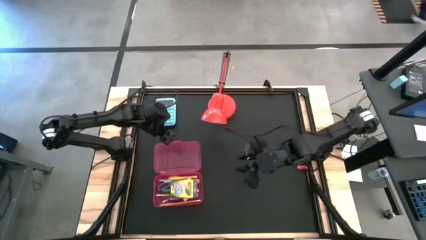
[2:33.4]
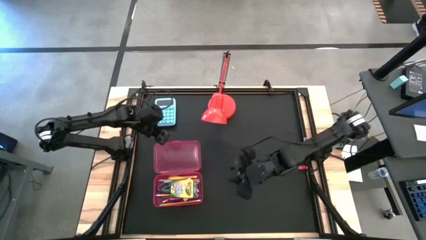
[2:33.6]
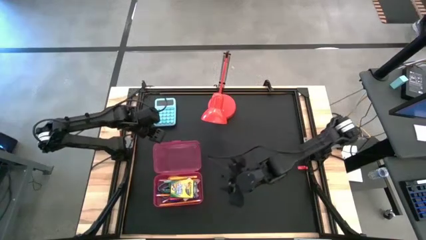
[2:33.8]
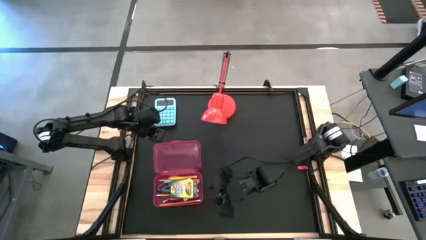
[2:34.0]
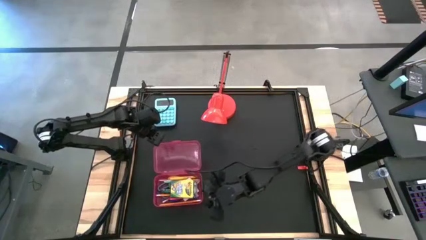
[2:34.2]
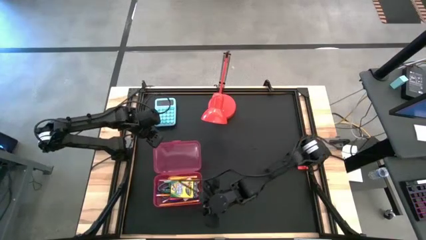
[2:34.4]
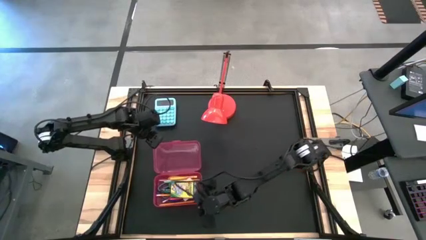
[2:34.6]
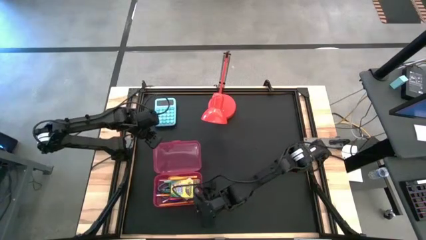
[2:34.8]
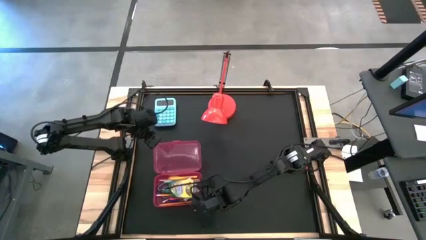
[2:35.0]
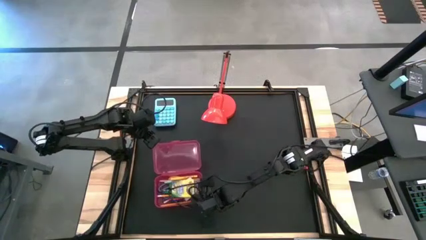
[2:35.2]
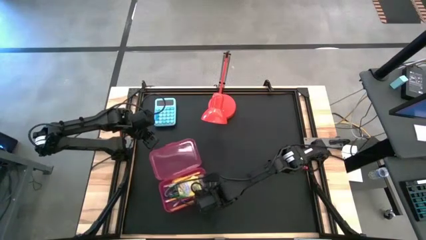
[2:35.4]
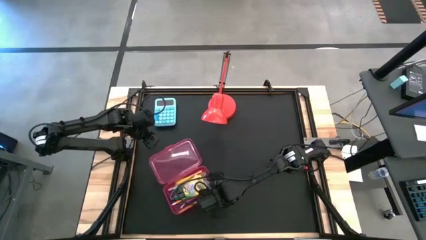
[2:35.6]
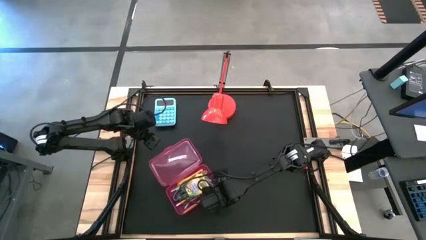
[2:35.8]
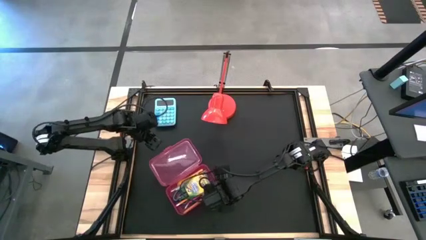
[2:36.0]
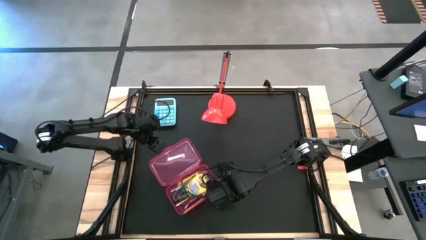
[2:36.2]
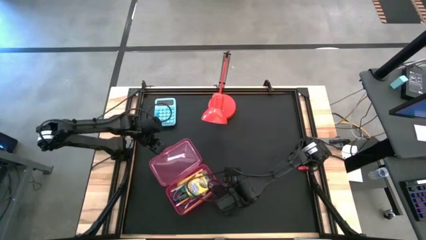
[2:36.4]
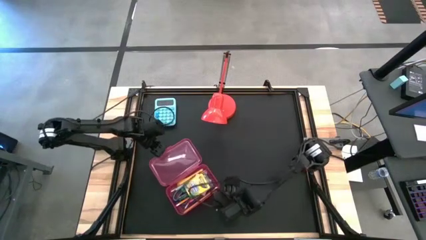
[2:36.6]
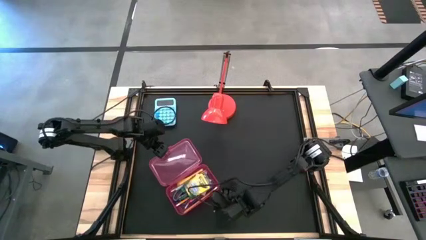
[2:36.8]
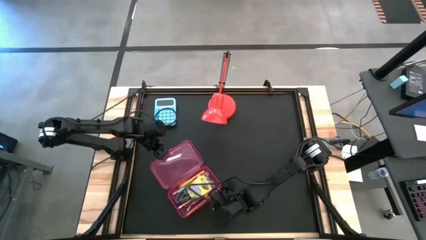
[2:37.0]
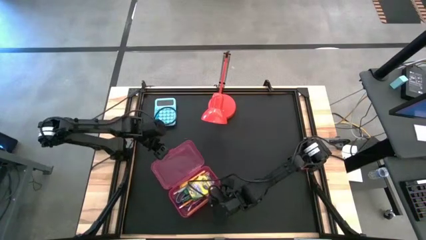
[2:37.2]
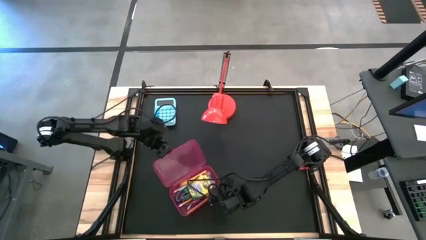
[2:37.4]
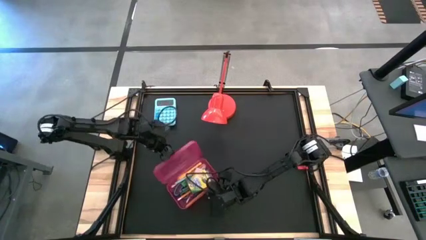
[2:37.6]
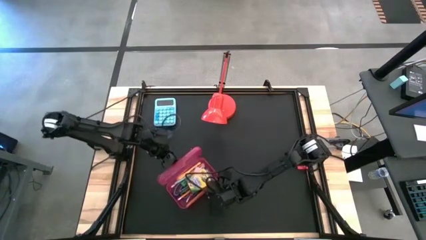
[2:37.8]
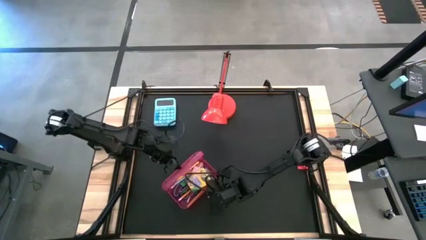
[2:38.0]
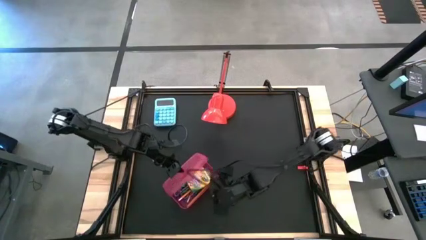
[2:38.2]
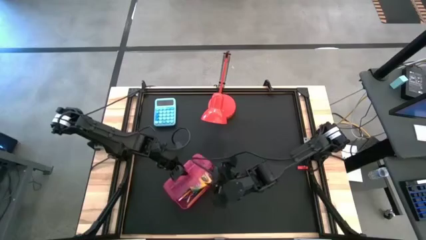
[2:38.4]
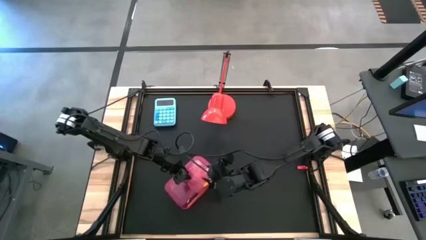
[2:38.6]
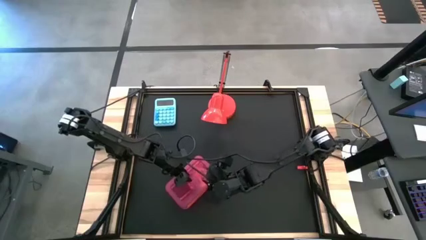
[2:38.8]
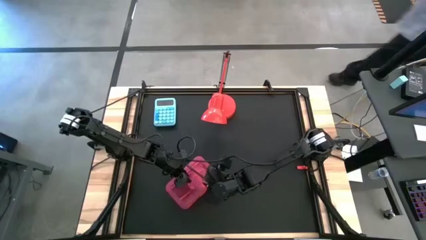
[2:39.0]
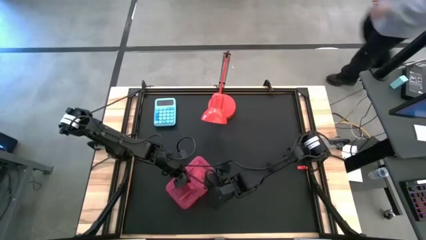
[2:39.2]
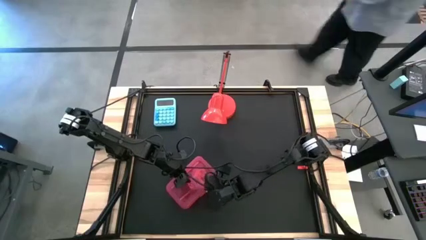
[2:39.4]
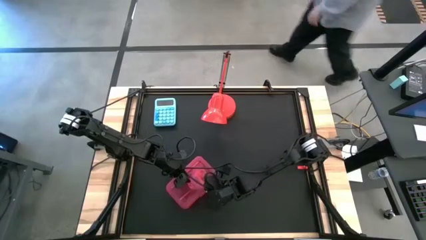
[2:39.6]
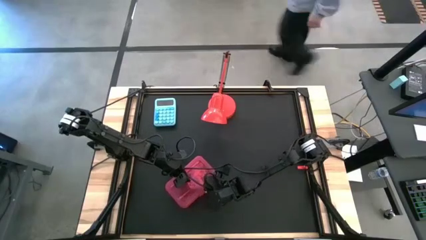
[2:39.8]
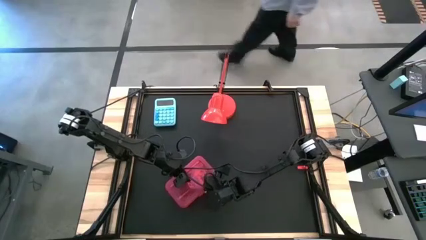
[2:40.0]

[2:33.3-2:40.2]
Task: Pack school essentials
Close the red supply box

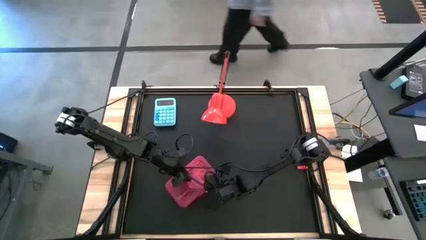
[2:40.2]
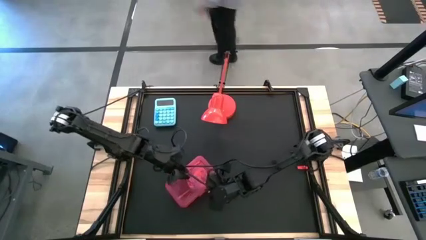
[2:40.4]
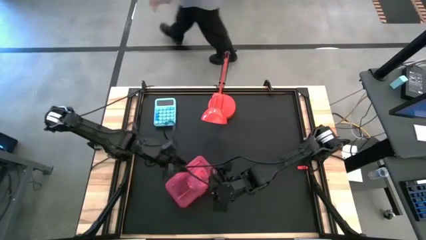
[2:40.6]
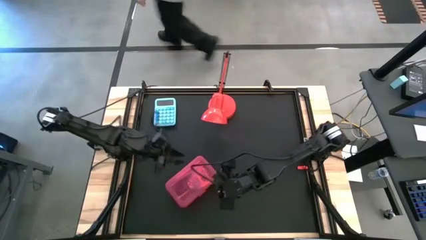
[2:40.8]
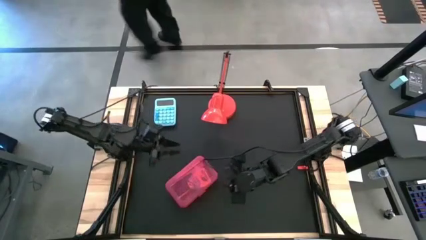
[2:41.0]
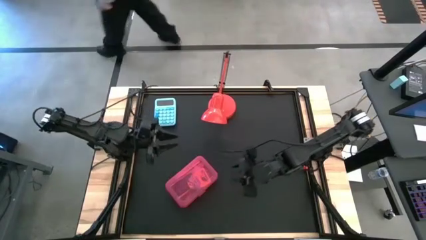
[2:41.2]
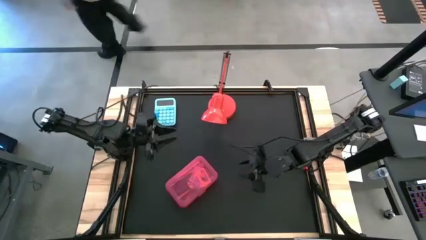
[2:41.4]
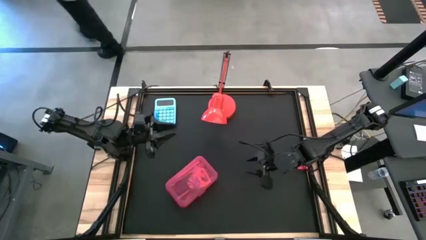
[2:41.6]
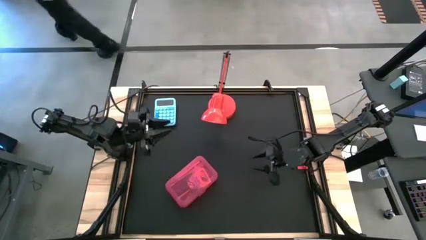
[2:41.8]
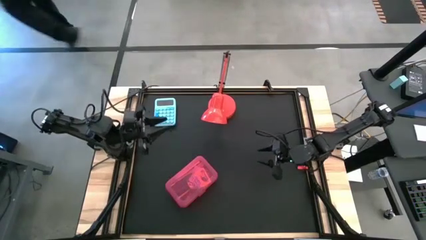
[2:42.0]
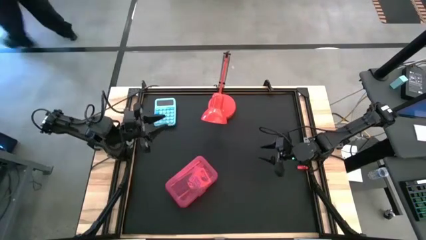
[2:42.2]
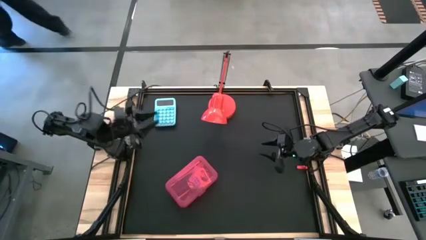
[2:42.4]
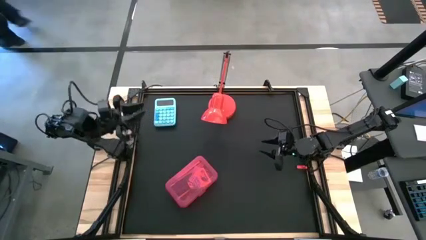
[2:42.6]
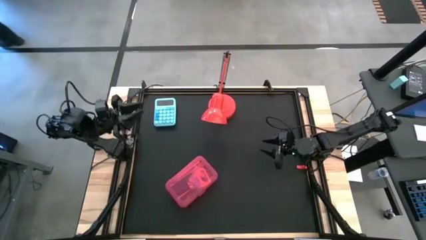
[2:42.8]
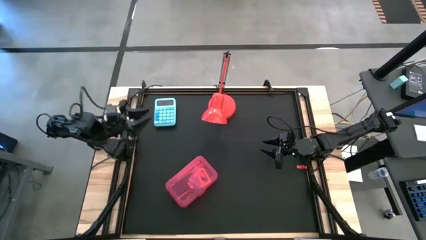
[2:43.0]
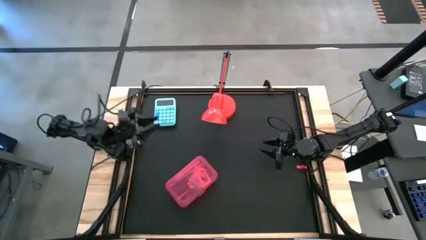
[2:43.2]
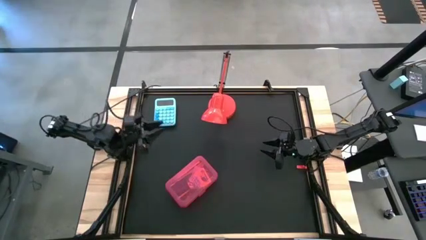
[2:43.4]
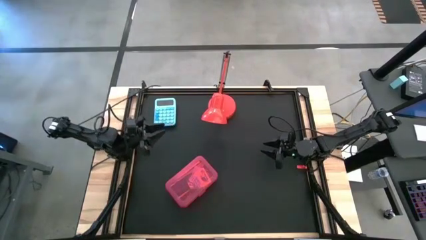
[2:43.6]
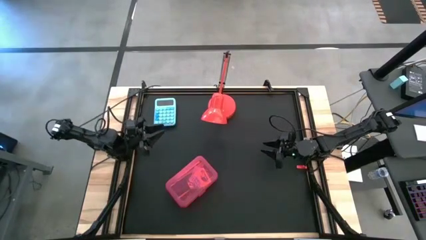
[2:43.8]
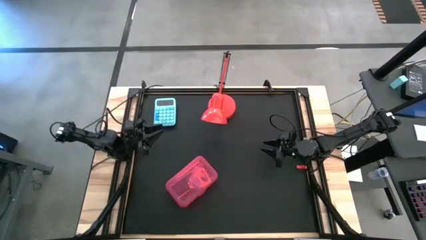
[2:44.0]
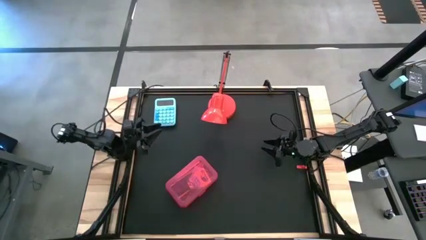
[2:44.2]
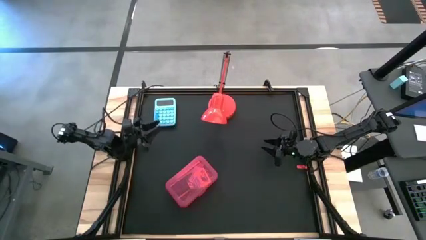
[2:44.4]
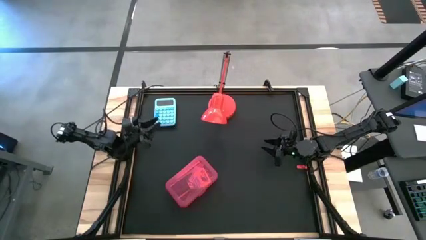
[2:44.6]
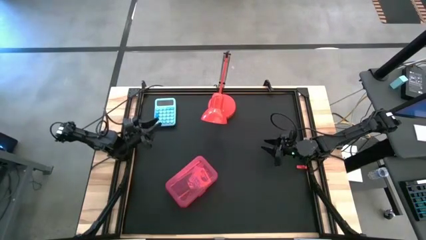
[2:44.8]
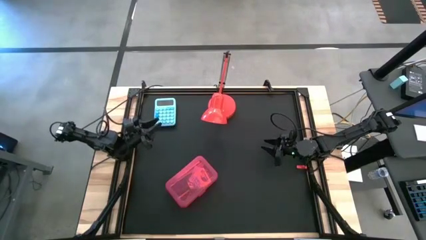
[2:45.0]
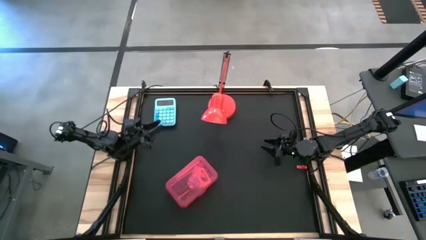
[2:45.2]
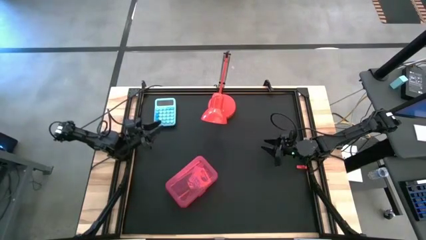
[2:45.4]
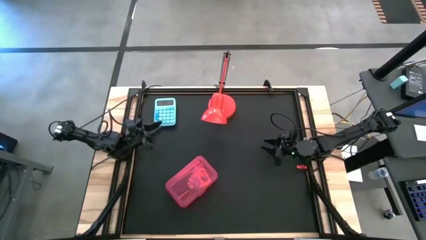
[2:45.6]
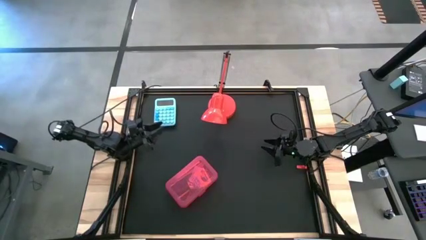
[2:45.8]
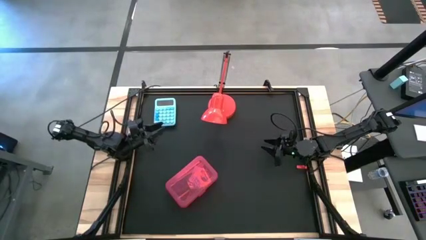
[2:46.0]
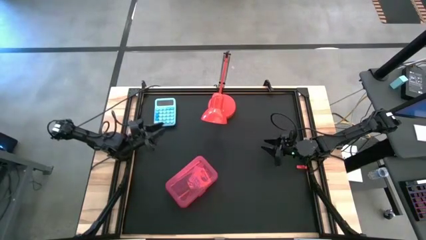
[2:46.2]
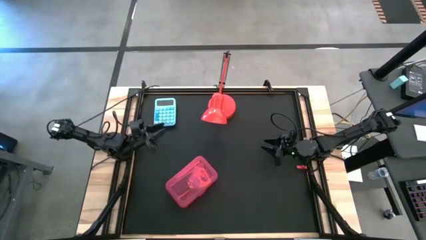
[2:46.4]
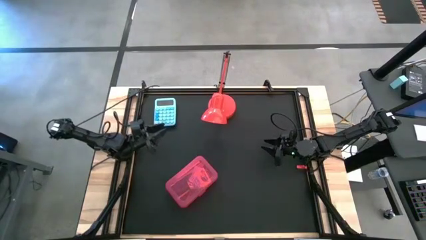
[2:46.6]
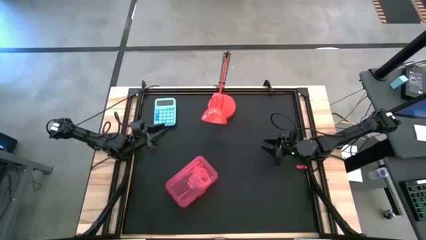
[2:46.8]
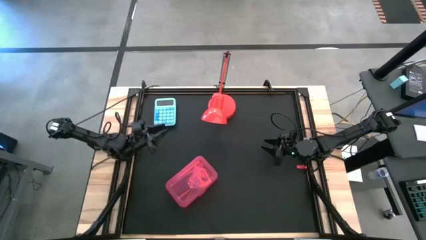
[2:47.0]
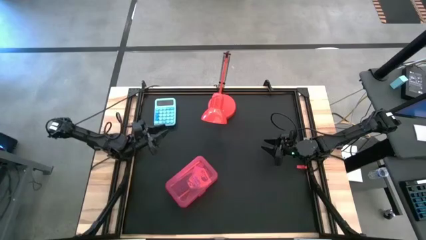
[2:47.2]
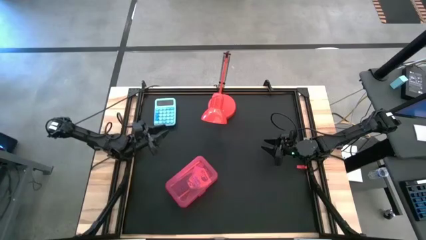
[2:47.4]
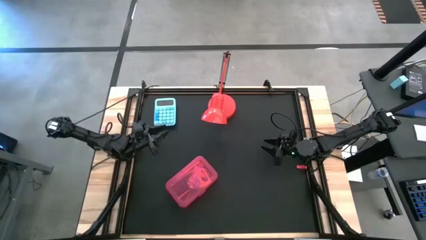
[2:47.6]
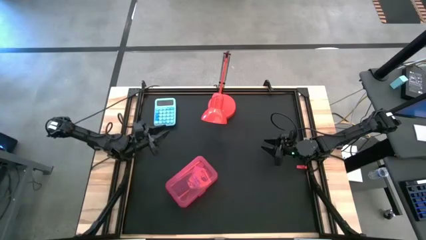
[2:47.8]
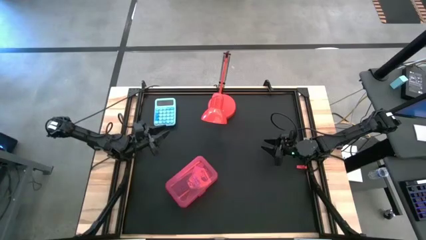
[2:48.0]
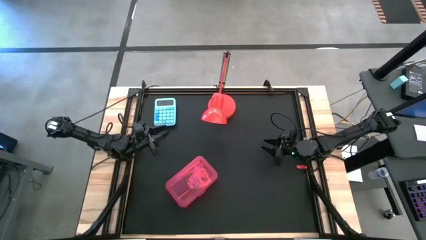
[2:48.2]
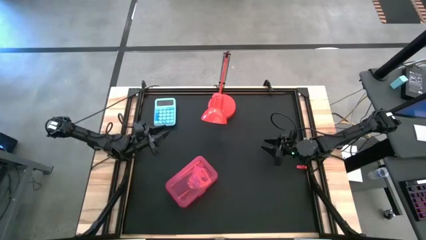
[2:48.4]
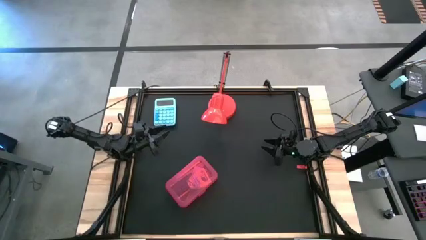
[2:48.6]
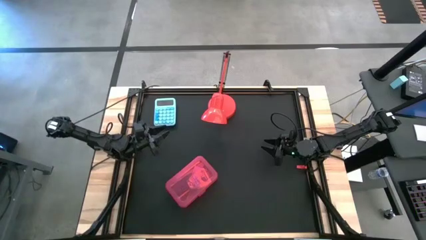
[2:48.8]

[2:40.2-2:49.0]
Return to Home Position
